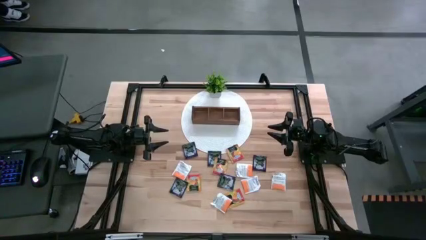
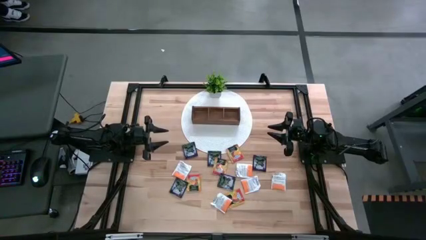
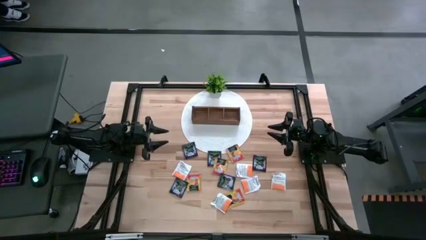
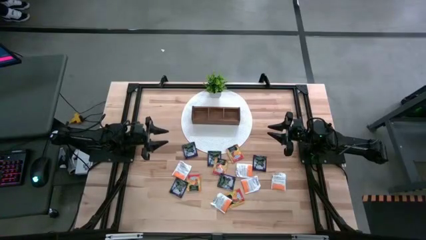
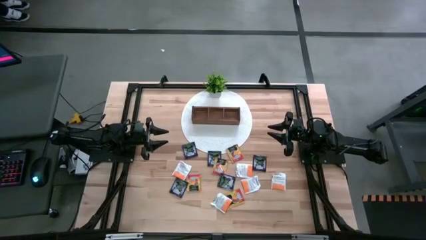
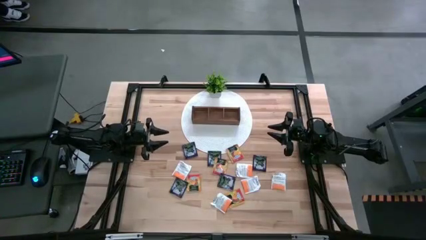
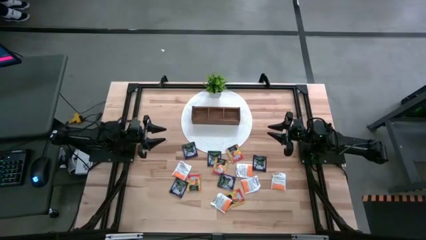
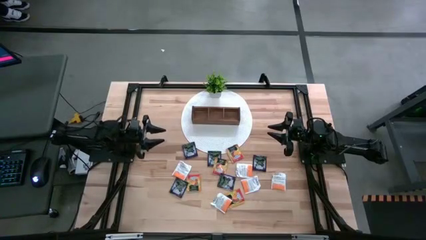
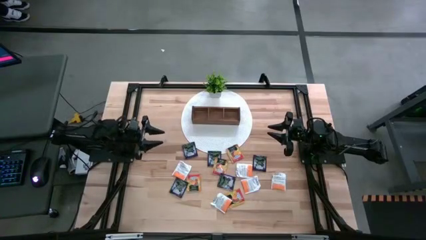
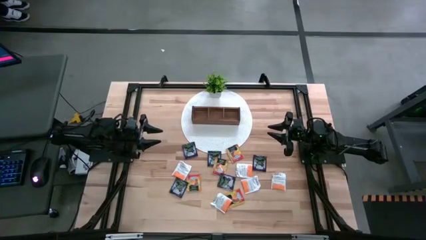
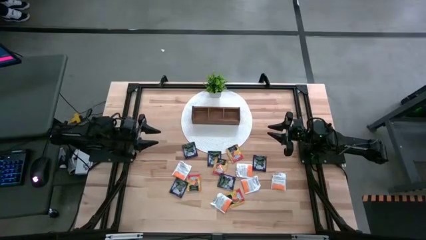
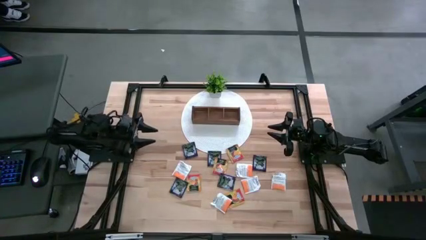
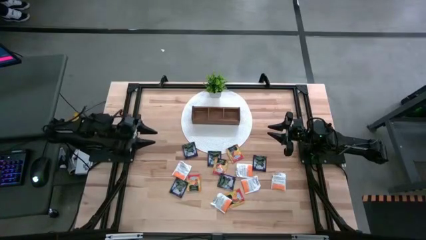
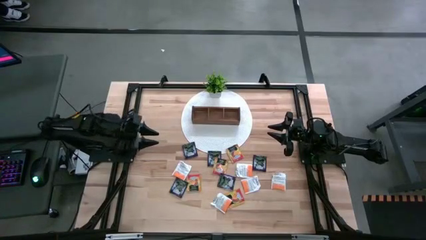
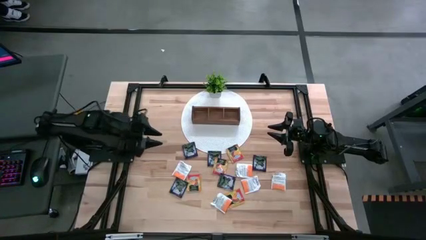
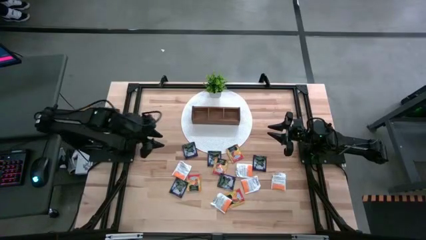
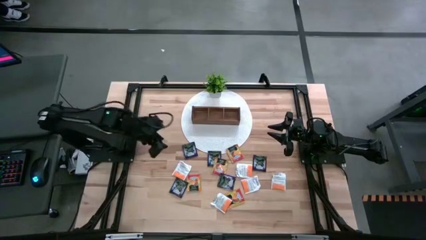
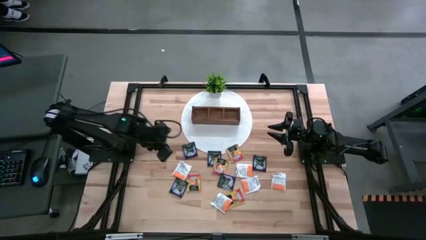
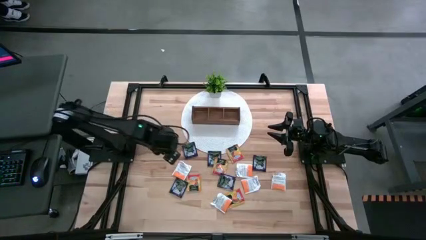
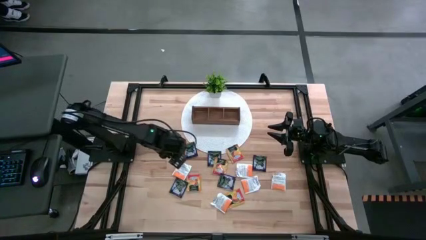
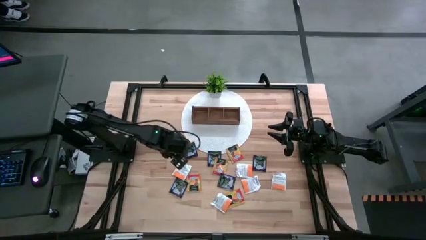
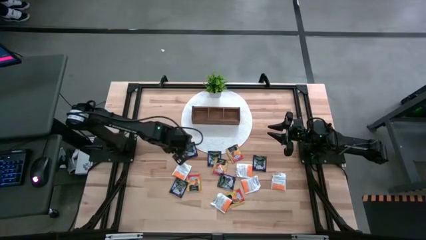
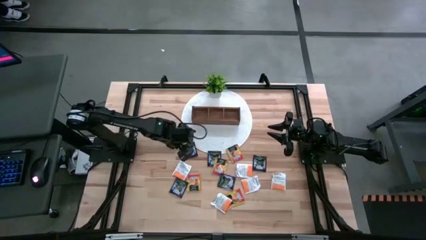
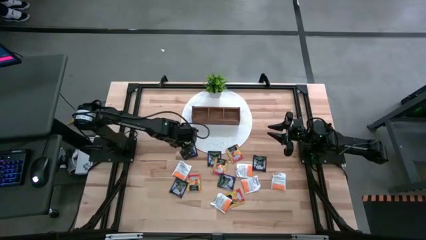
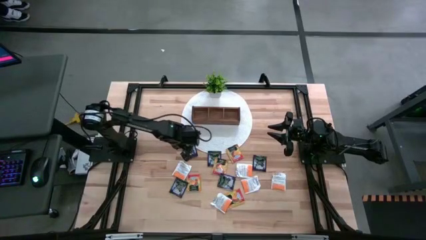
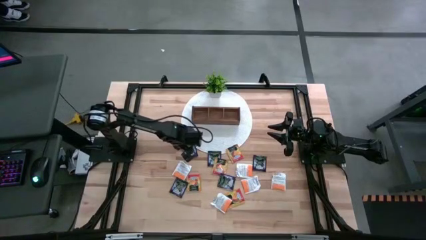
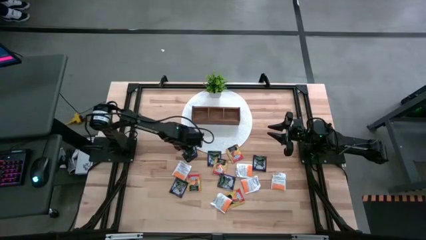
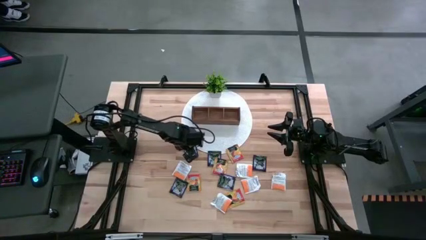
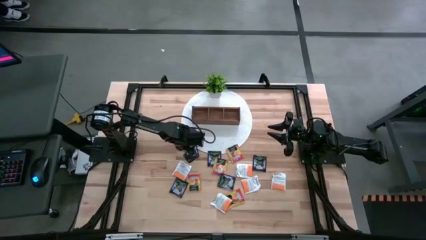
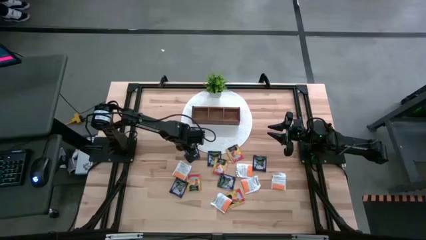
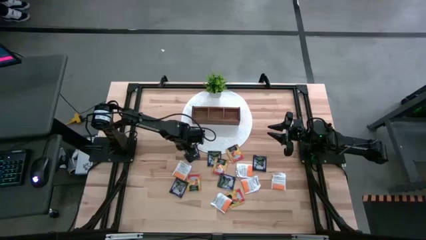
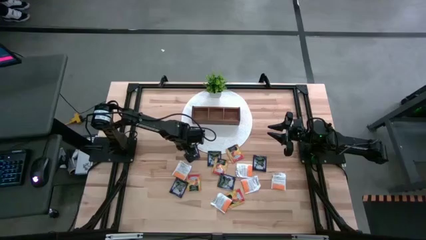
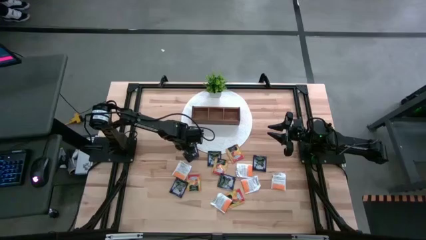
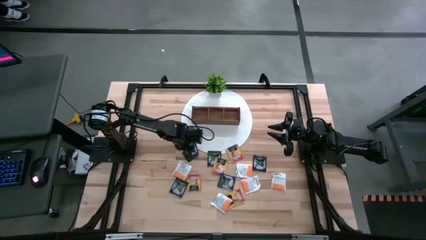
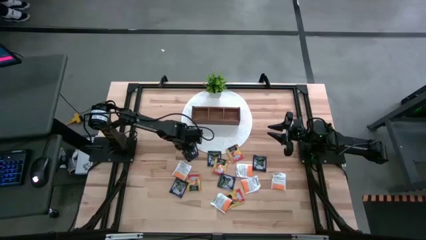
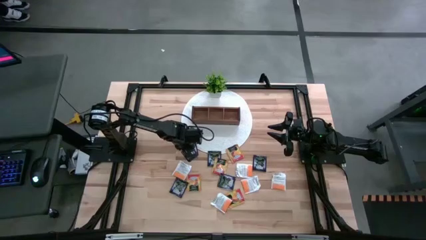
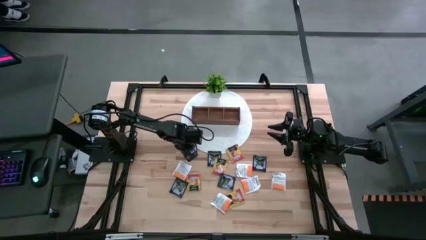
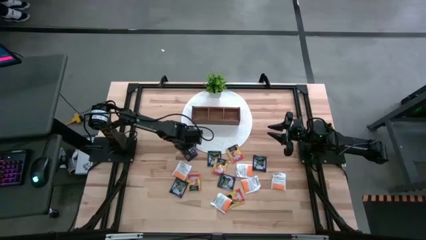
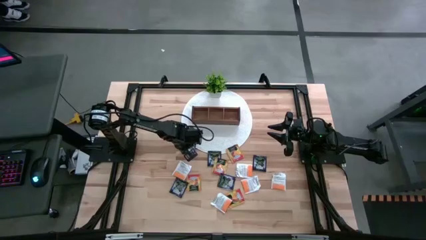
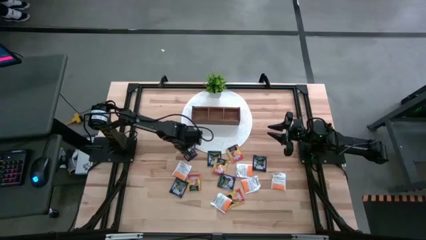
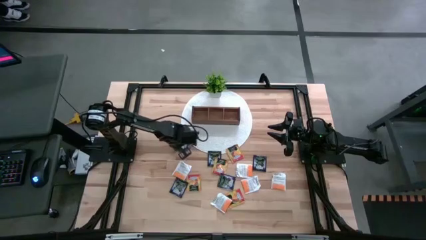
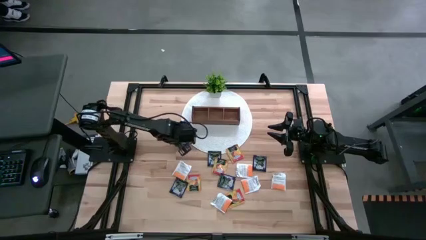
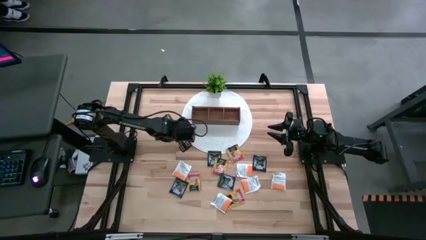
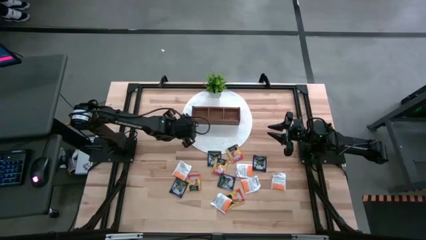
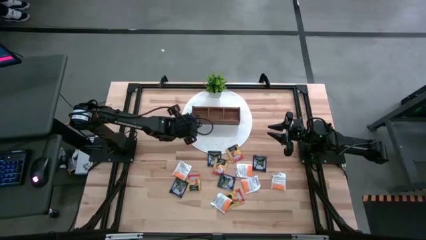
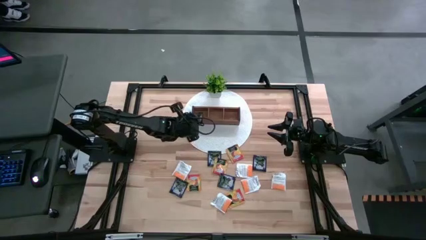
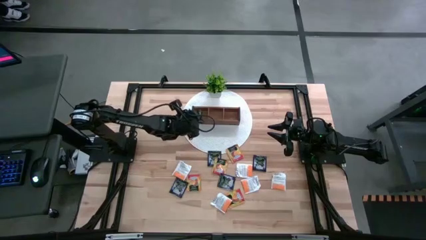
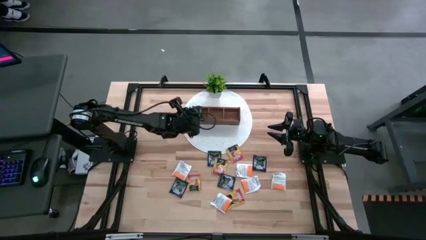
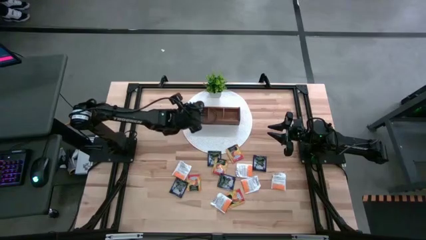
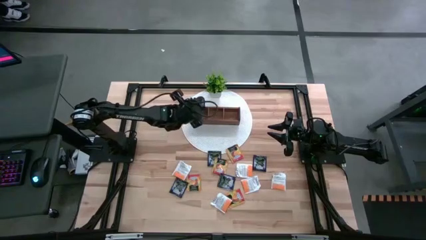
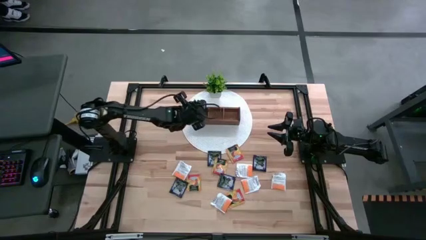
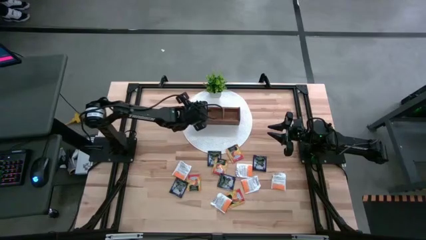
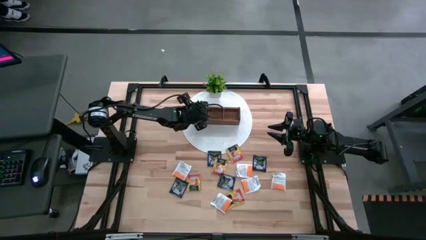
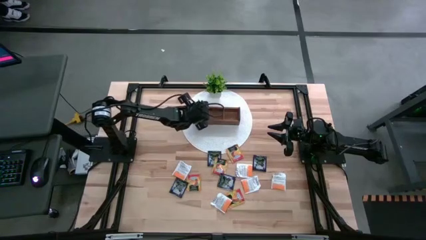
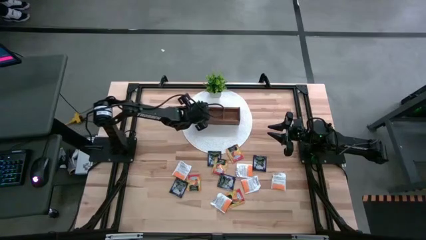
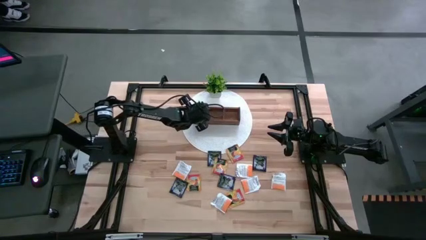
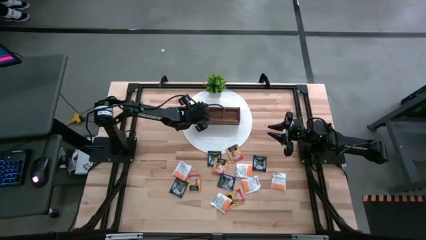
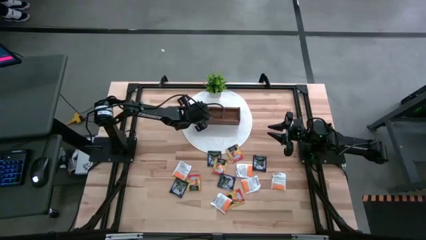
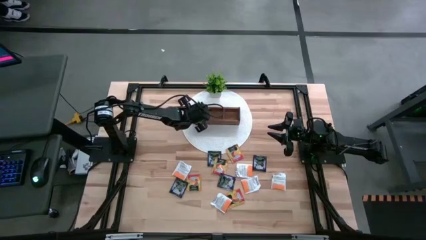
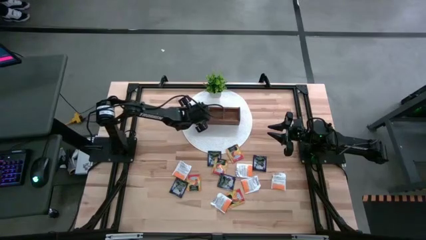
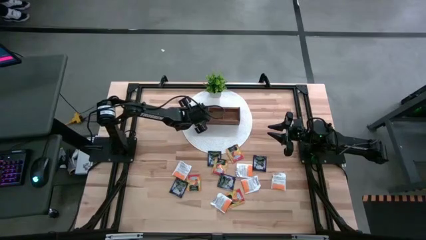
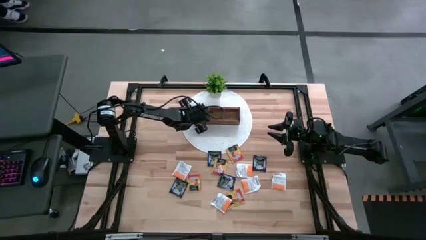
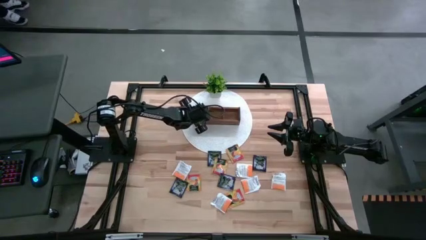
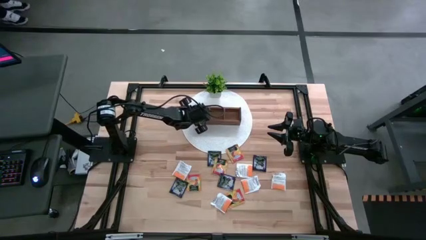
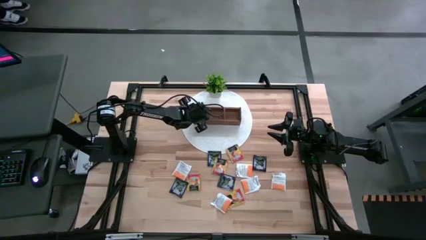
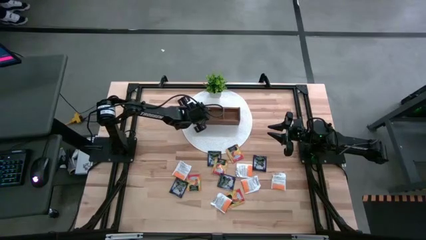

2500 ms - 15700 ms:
Task: Pick & Place Tea
Put the black tea bag into the left section of the wooden organizer
